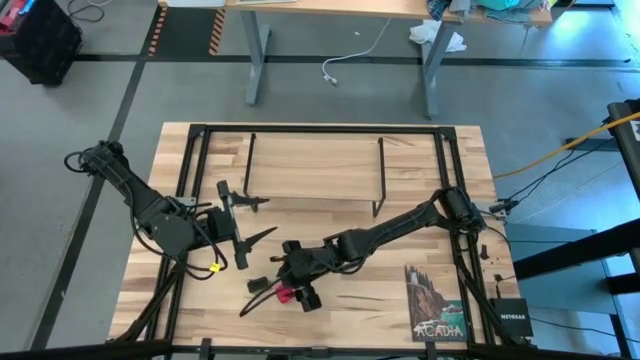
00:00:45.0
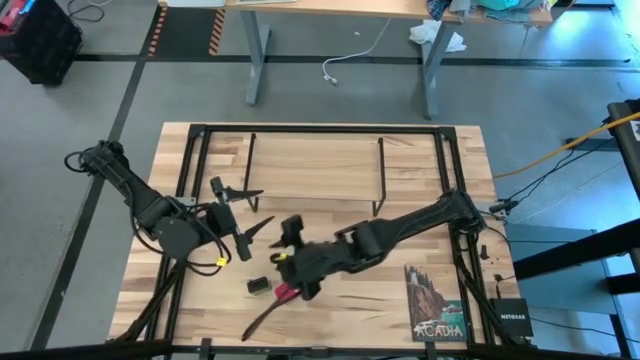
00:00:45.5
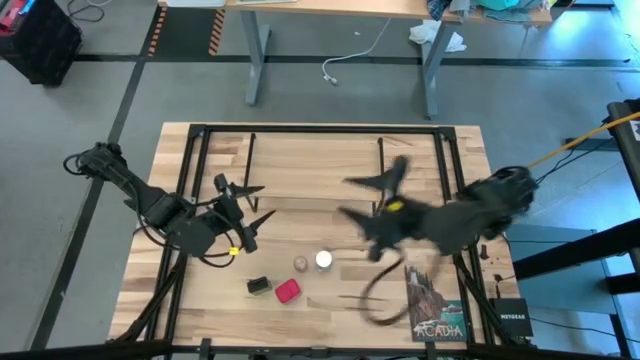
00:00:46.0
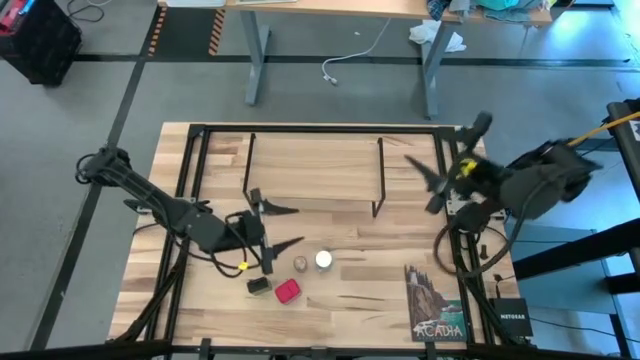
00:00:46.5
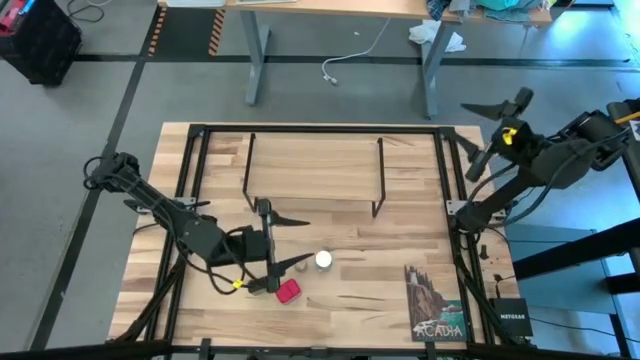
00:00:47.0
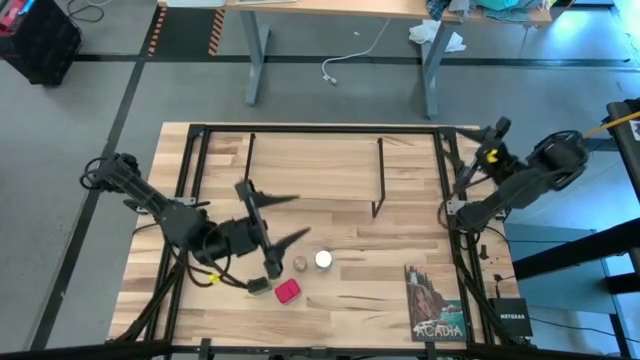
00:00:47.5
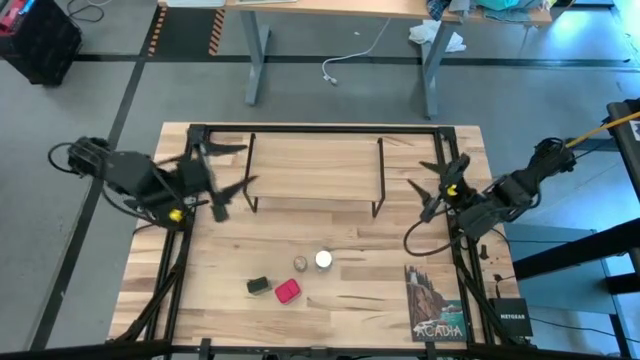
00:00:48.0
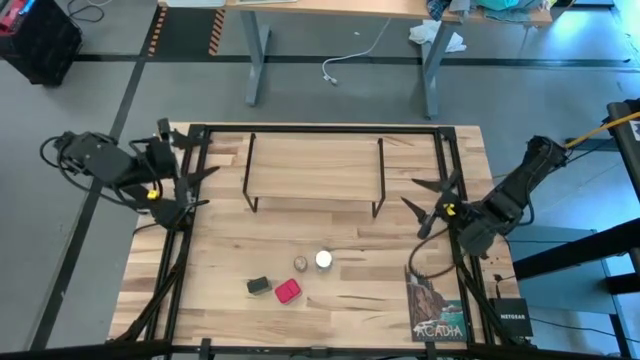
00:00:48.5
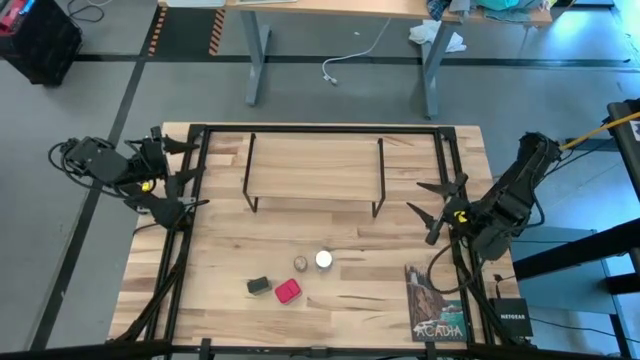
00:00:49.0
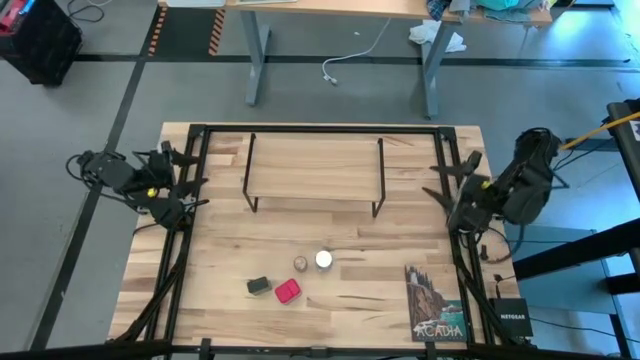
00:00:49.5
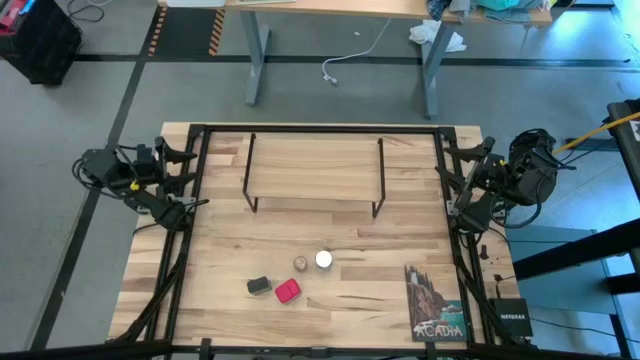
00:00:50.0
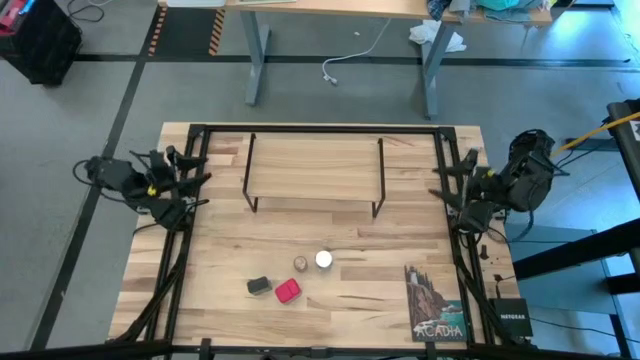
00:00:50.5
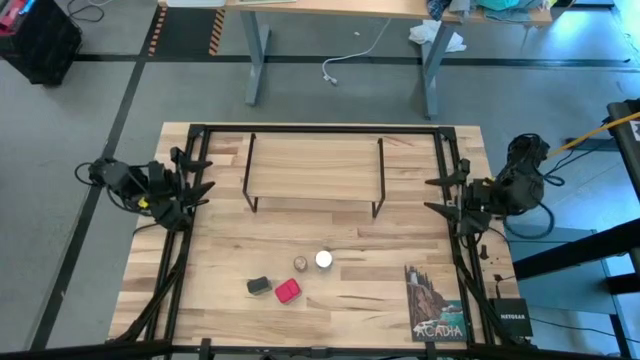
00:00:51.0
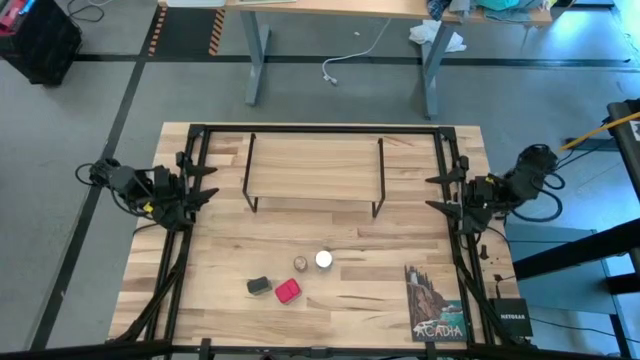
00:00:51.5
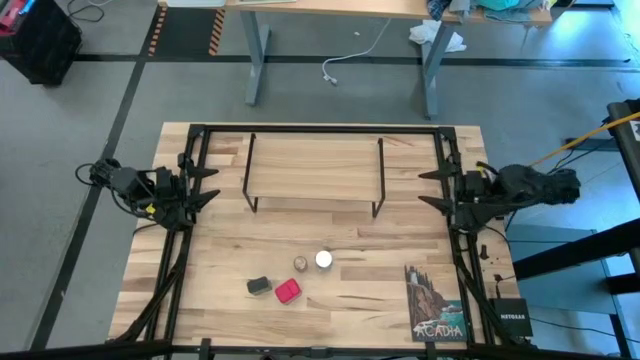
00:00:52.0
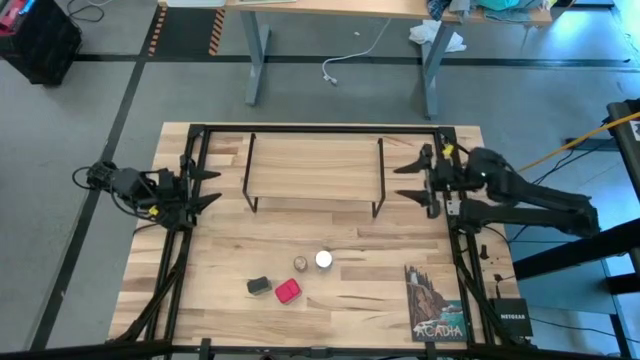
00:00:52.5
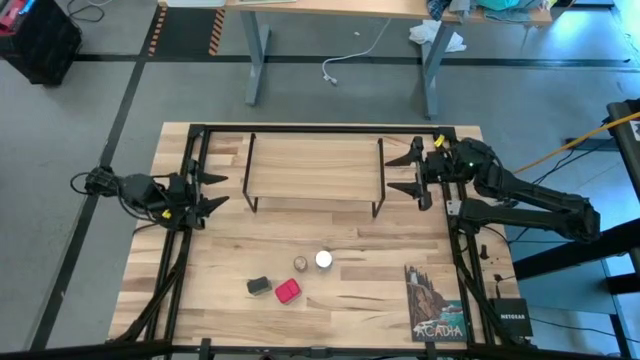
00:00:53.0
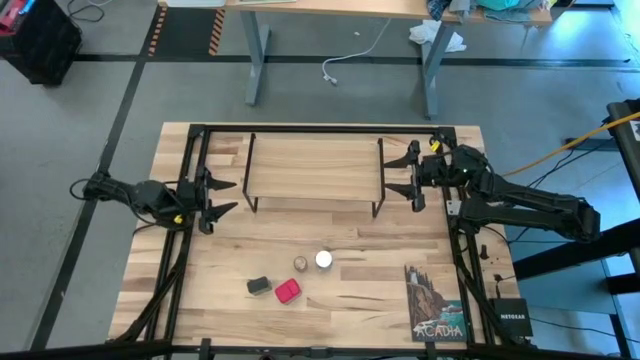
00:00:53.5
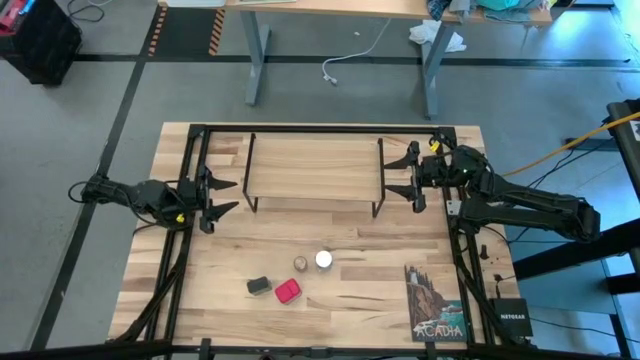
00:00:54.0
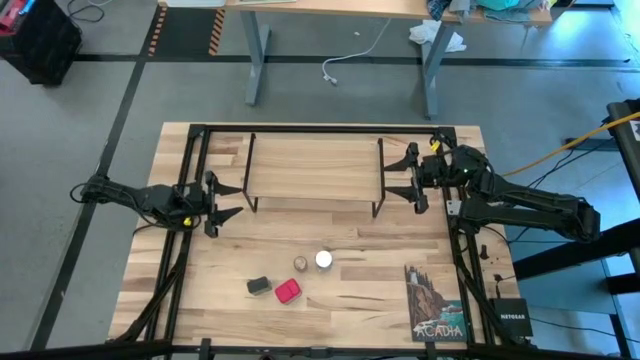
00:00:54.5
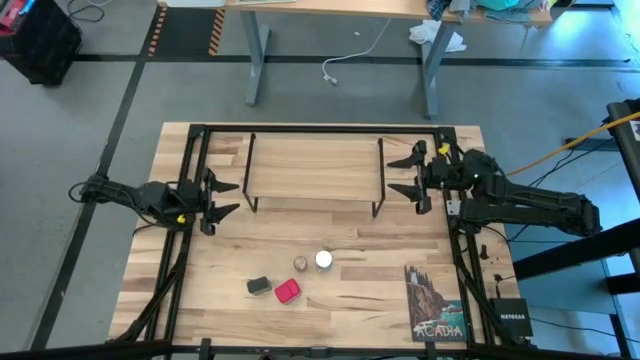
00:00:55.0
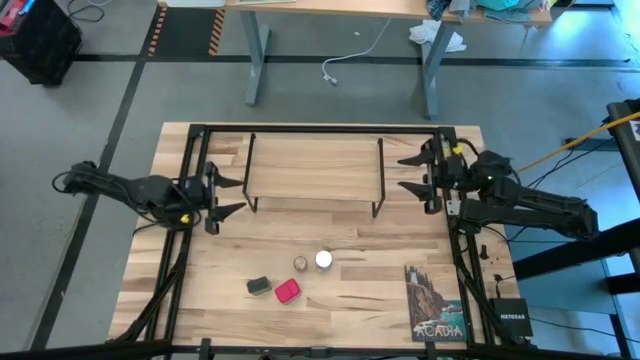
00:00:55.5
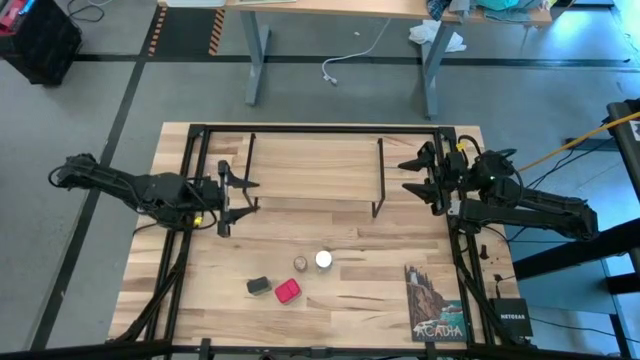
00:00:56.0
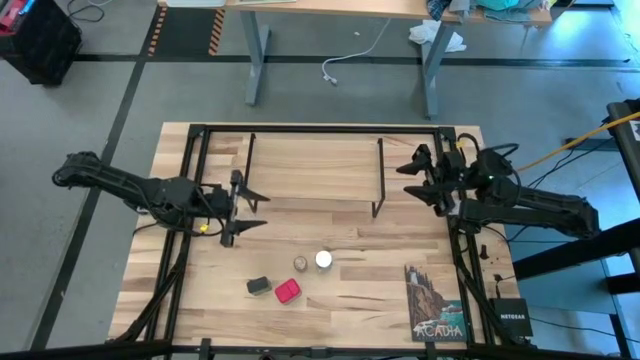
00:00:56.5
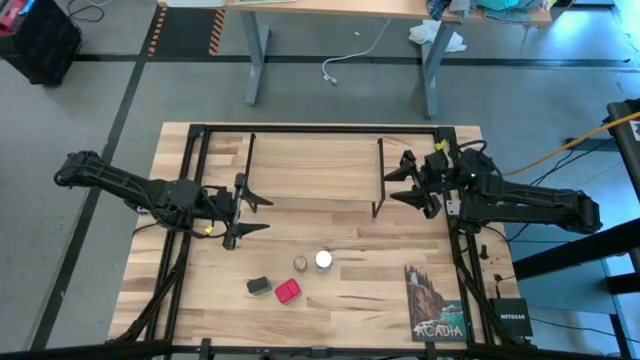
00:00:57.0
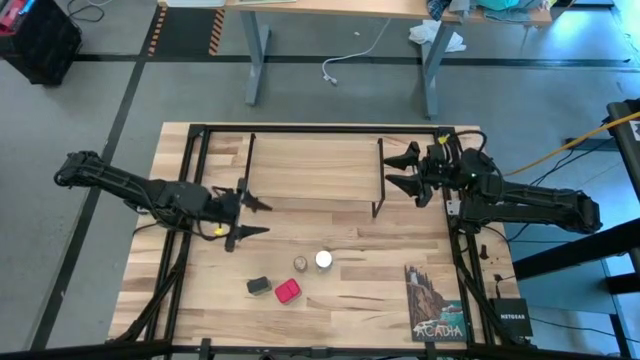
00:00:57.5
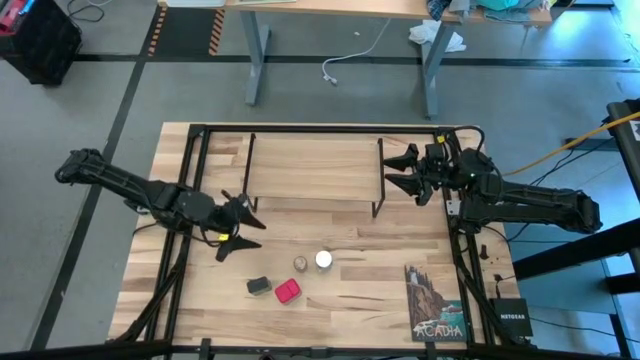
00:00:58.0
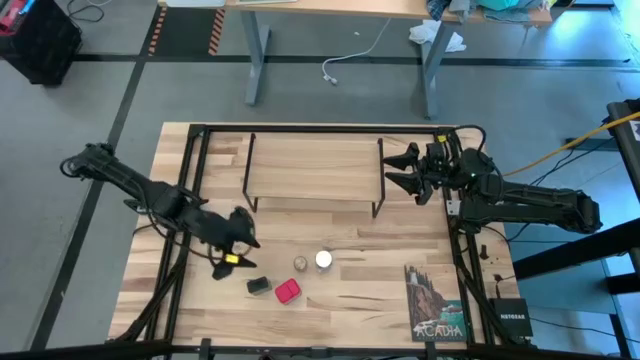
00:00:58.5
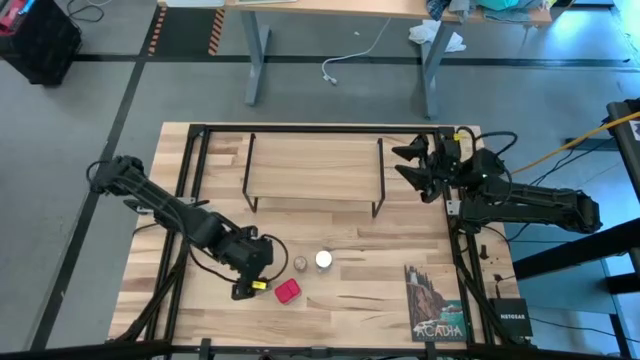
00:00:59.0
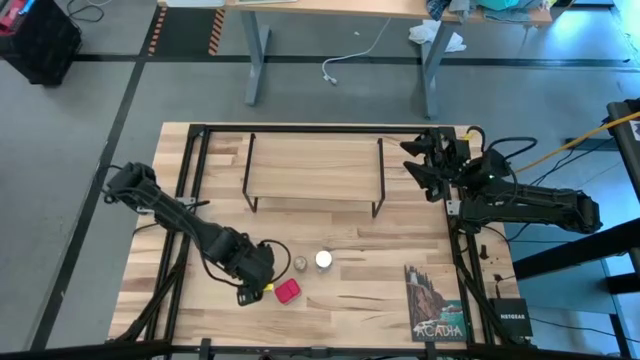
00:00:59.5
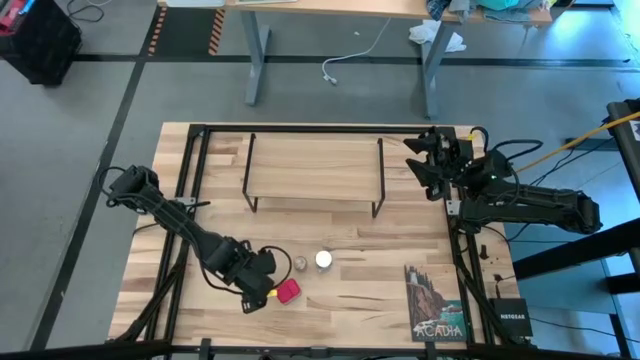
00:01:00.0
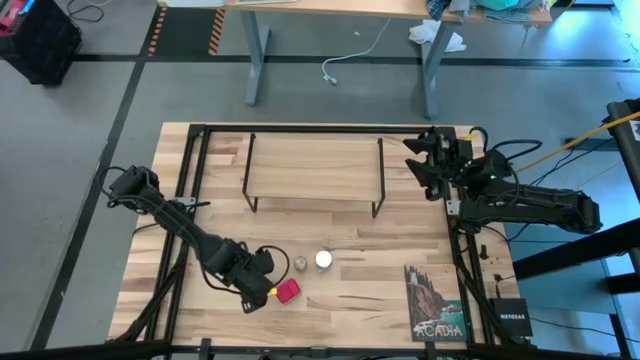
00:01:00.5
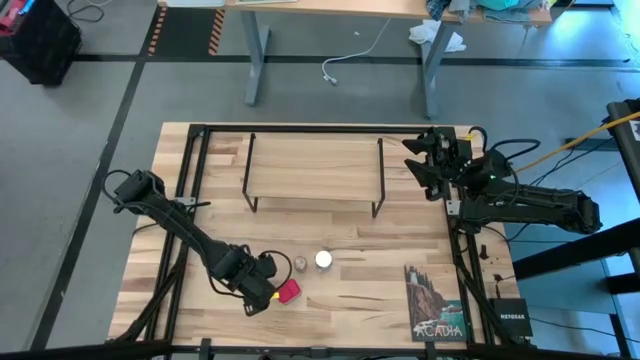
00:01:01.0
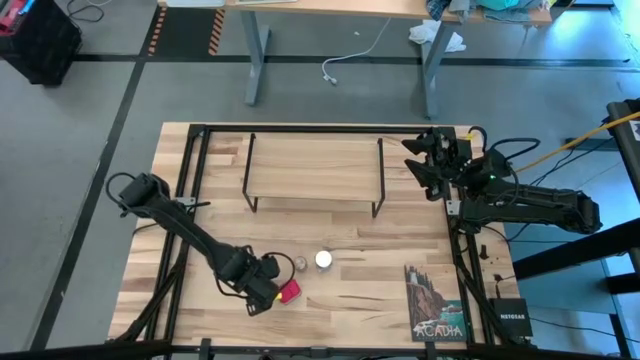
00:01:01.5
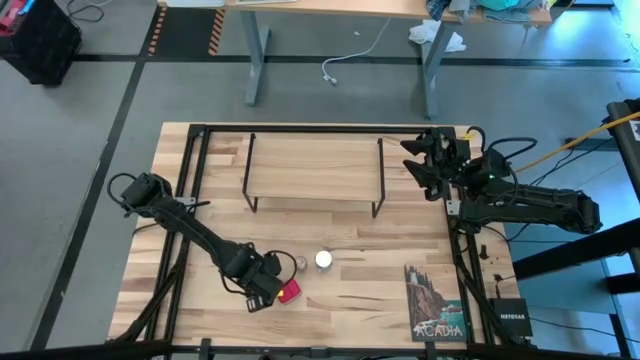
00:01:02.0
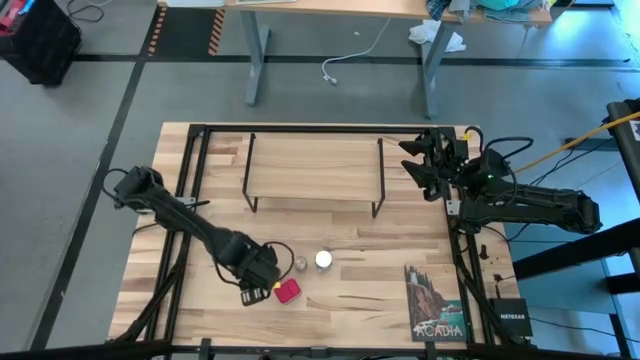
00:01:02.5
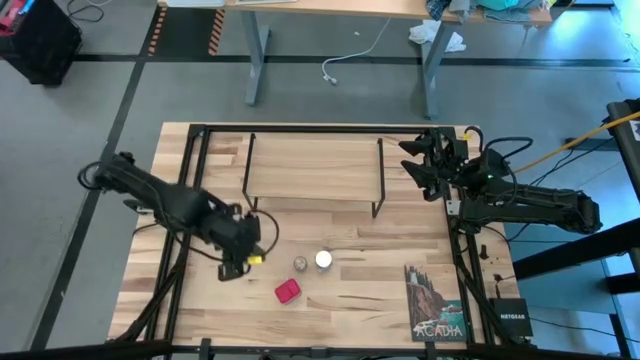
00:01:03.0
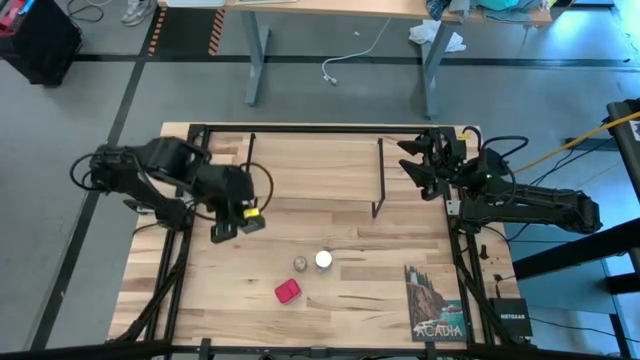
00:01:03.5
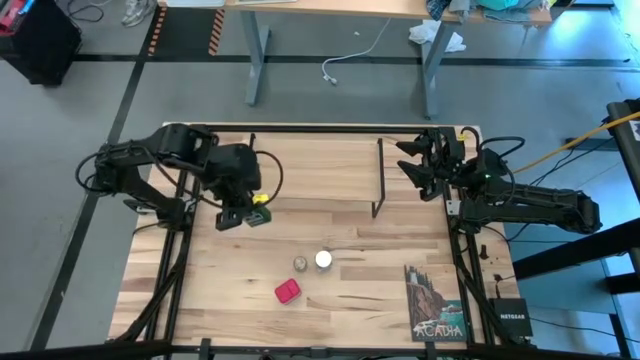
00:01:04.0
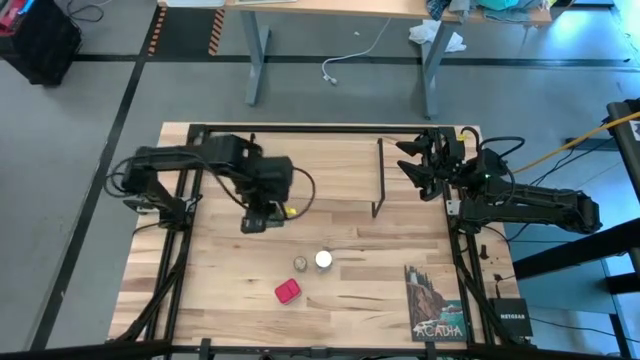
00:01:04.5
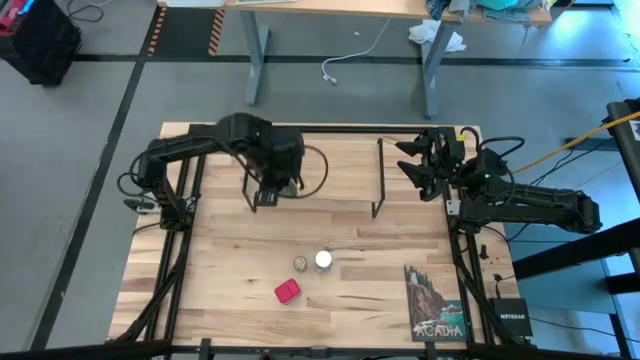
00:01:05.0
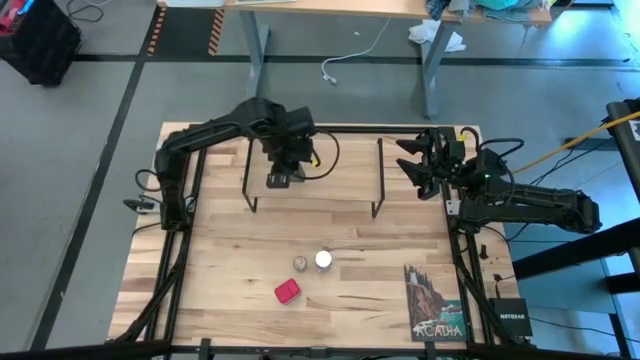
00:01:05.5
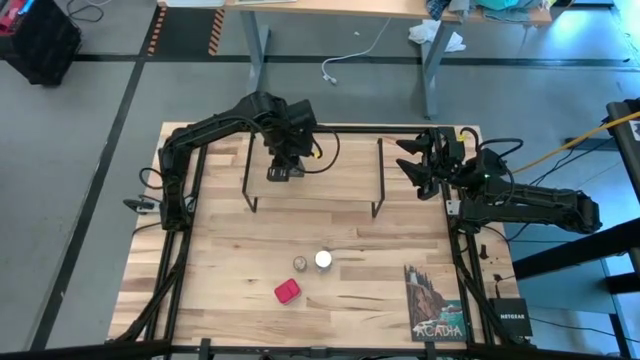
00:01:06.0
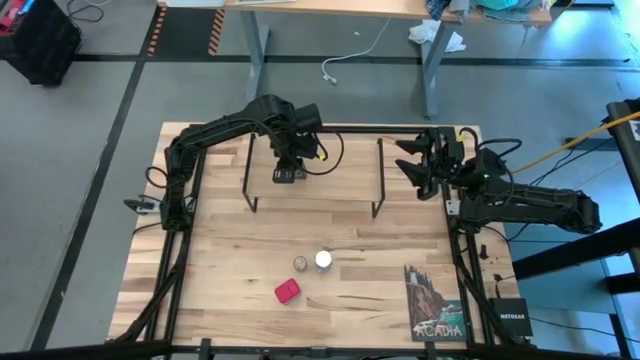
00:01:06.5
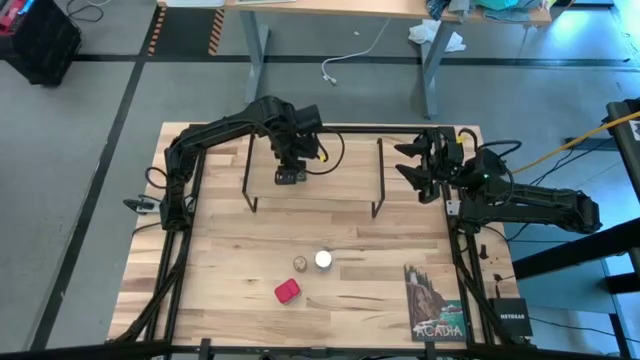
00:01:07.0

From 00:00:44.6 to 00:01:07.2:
Task: Shelf spices
Put the green seasoning can on the shelf
